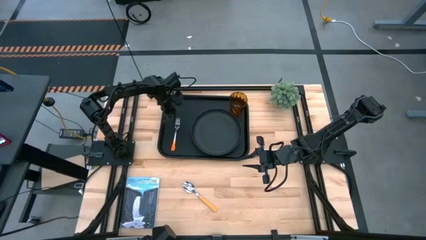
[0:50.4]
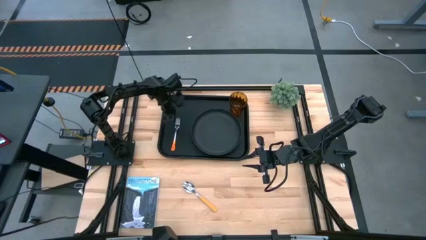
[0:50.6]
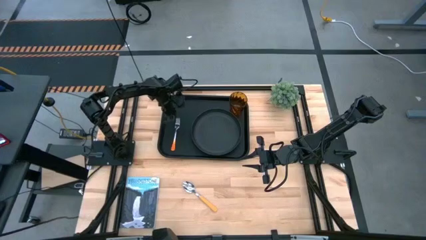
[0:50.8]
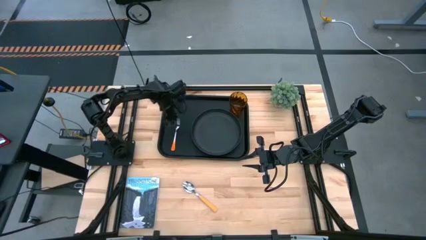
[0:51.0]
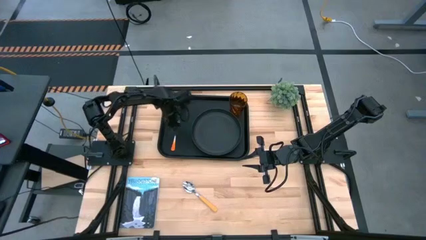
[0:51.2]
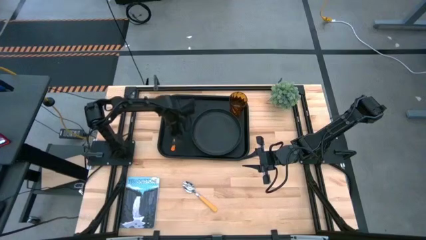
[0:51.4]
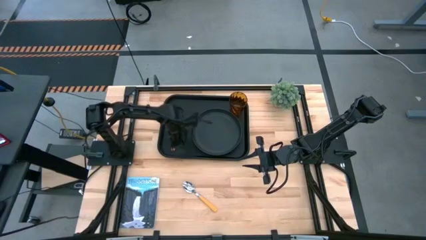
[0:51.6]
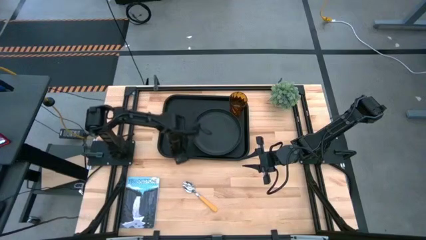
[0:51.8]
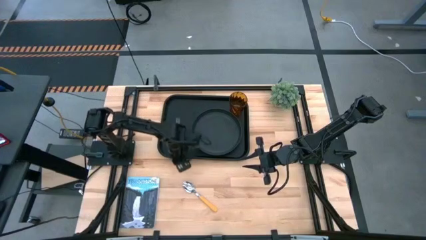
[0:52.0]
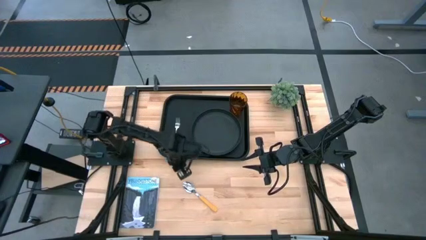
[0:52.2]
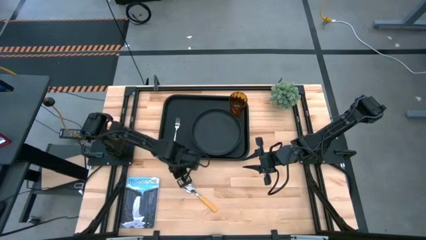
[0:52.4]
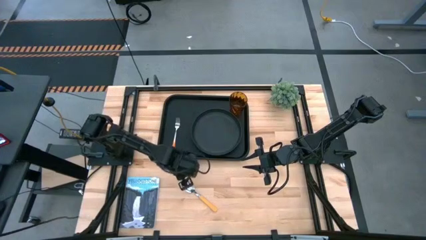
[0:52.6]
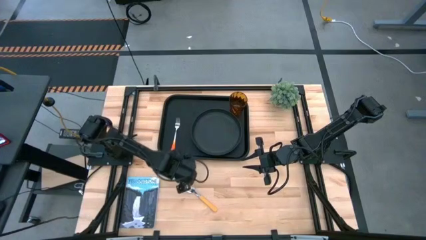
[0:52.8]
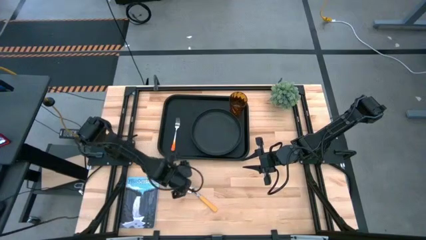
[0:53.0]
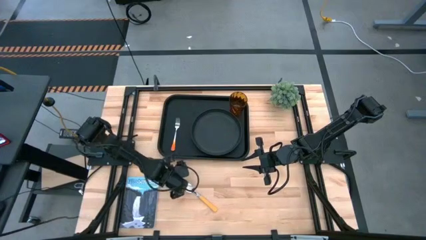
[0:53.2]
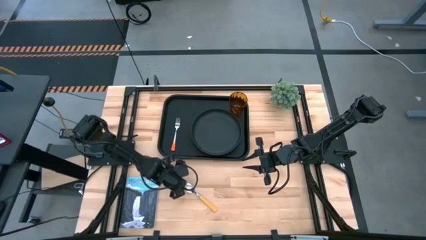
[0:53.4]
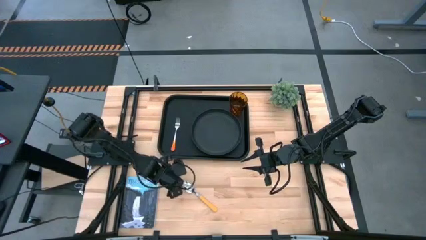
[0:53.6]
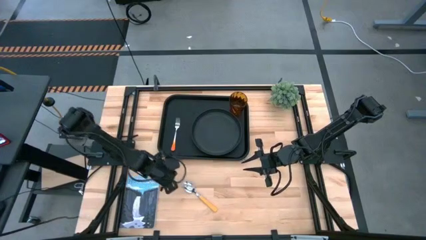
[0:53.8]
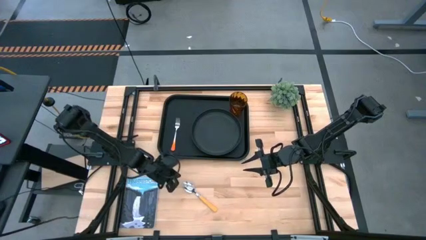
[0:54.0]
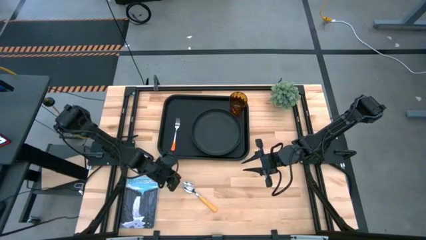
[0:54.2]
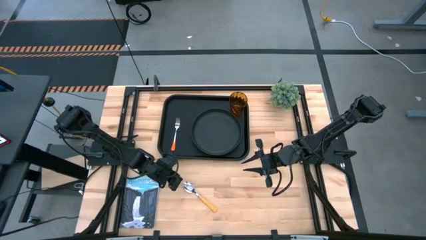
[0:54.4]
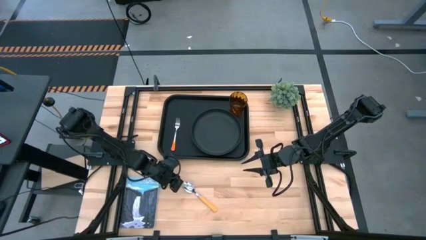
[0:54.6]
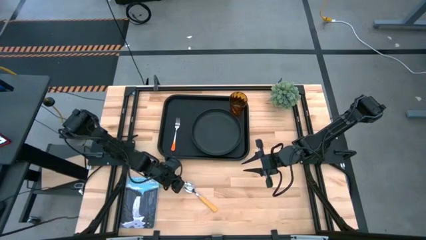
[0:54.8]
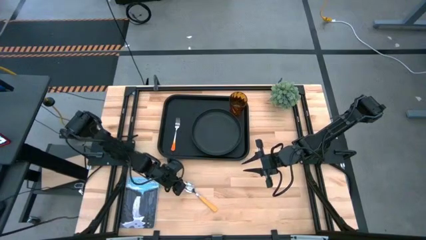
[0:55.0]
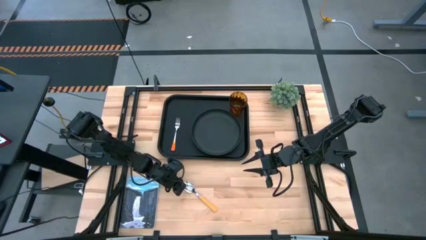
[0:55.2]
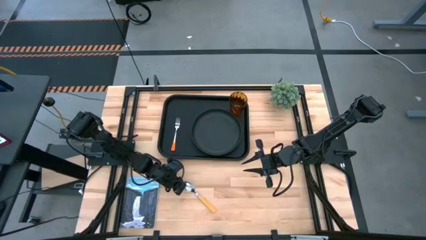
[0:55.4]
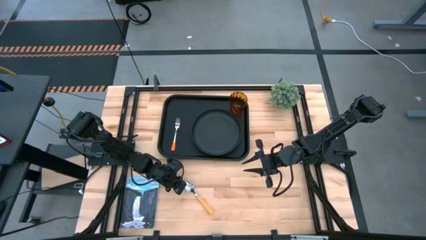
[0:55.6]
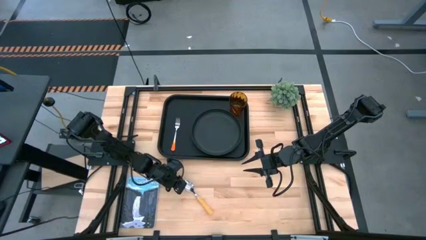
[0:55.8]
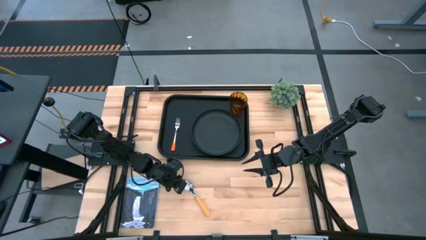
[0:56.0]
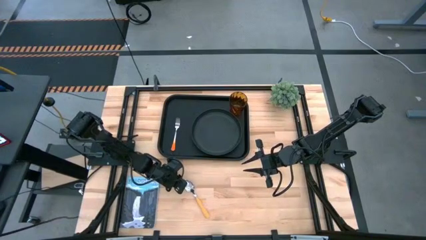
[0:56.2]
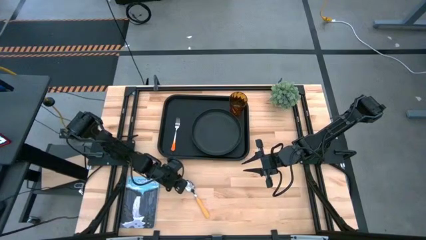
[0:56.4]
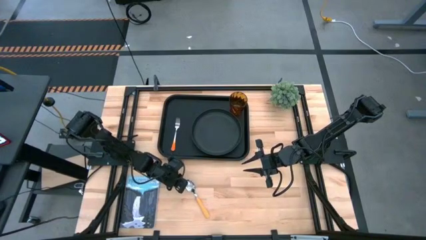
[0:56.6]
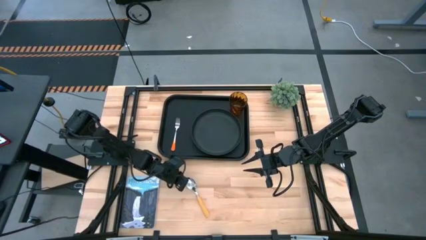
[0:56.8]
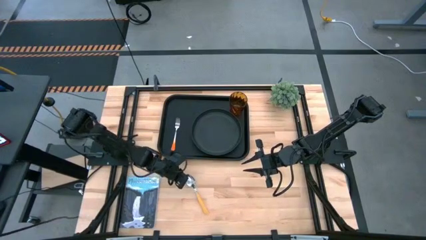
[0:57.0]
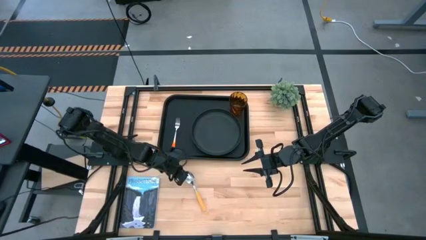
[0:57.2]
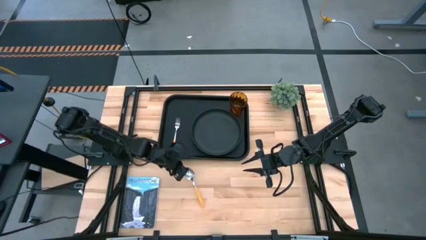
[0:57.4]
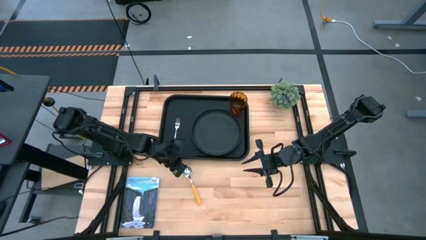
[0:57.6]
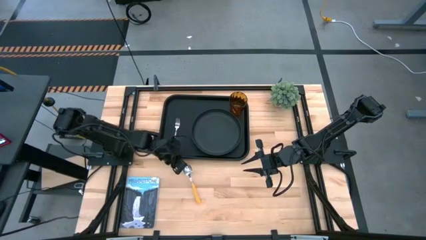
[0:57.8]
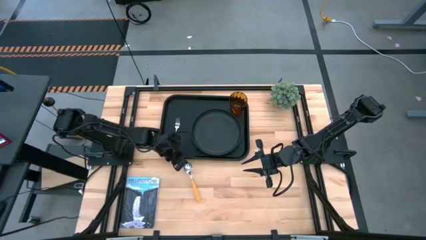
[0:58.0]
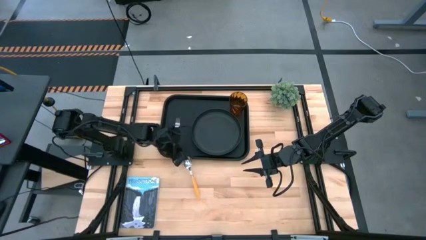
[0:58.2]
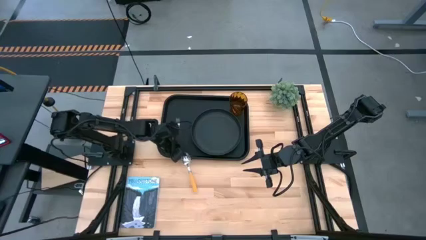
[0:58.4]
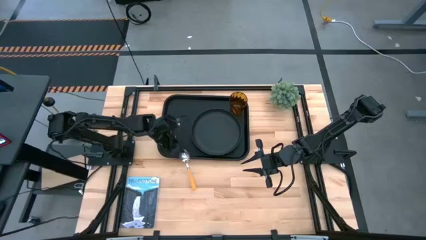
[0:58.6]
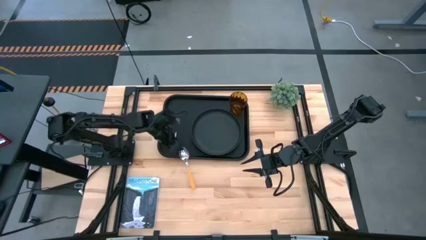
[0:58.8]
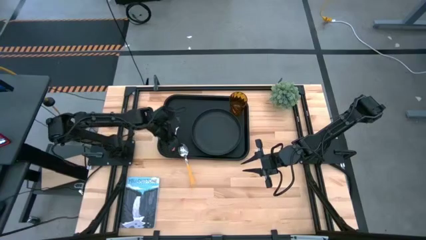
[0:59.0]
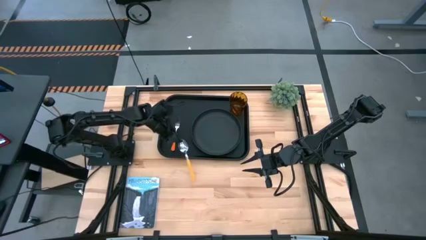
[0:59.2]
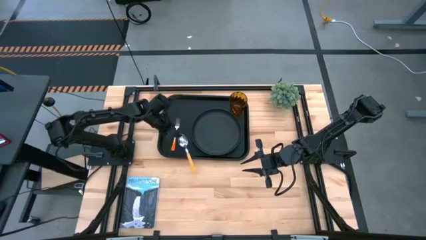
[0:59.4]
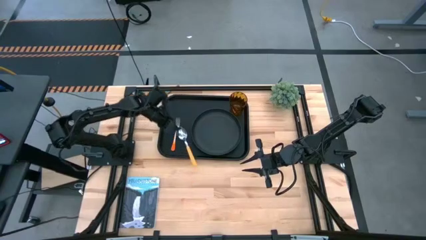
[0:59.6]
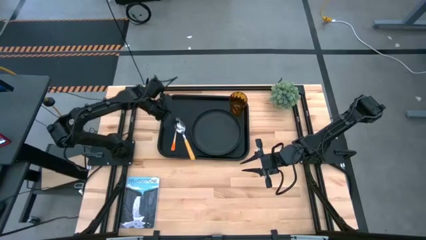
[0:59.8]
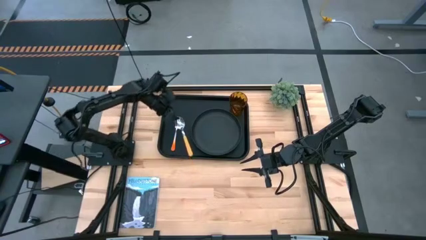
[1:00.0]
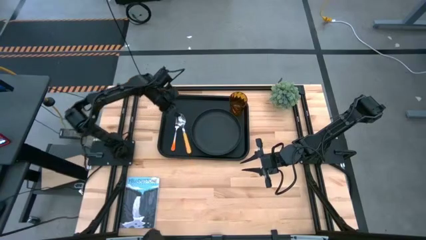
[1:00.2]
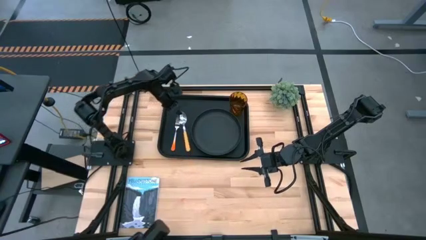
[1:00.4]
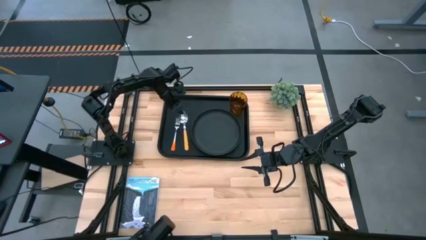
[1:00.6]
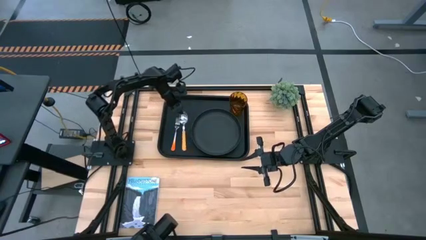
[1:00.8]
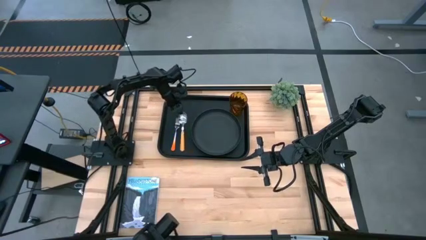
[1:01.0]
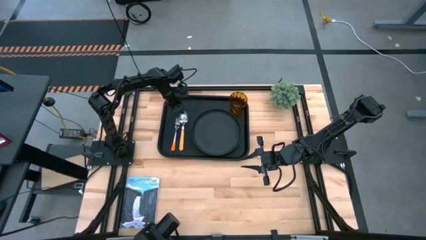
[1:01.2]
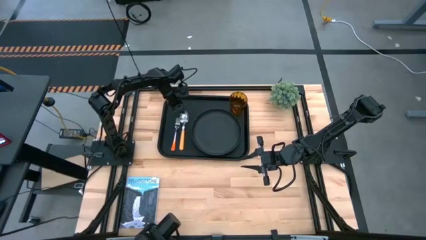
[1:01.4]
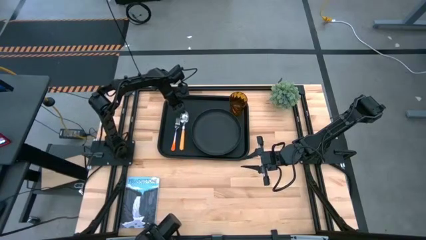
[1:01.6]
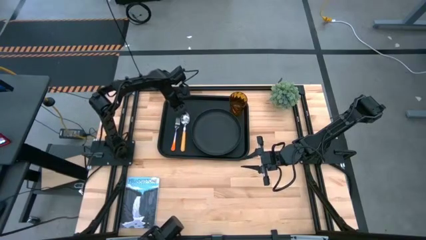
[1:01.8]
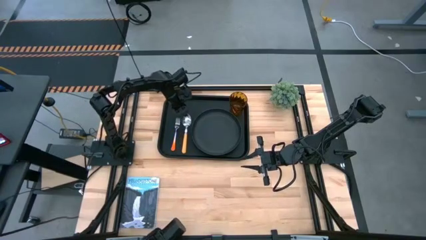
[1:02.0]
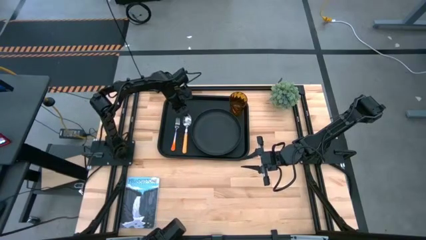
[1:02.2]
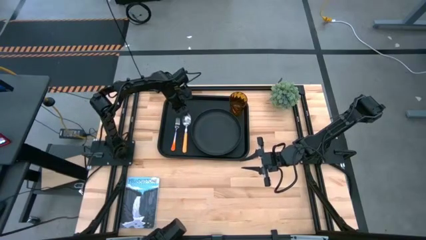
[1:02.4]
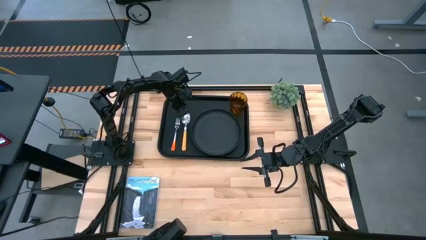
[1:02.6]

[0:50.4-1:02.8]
Task: Pick and place plate/cup/fork/spoon on tray
Put the yellow spoon on the black serving tray beside the orange fork

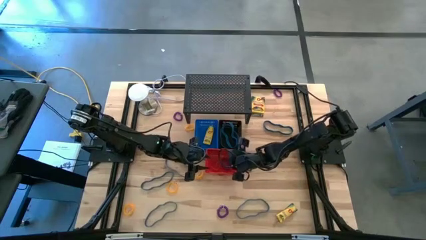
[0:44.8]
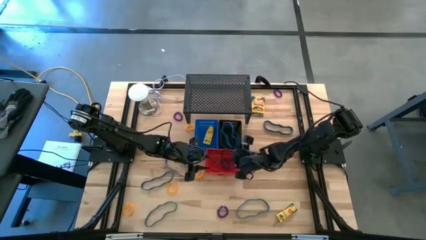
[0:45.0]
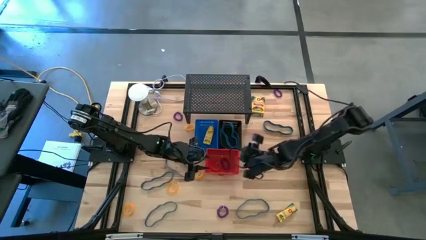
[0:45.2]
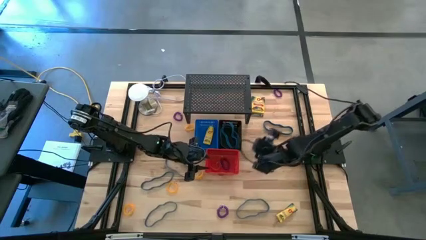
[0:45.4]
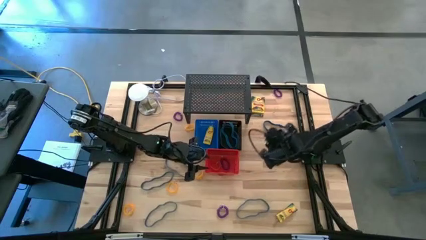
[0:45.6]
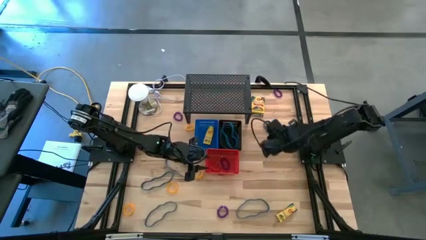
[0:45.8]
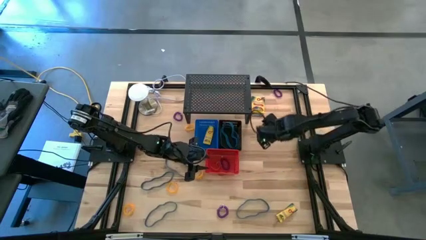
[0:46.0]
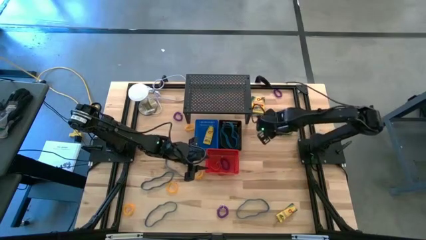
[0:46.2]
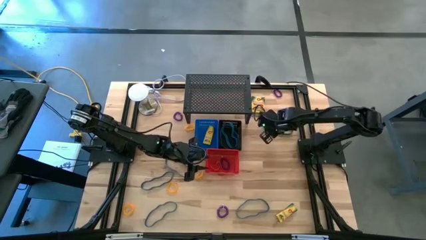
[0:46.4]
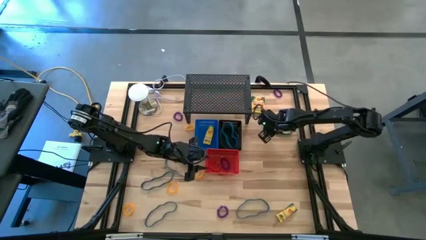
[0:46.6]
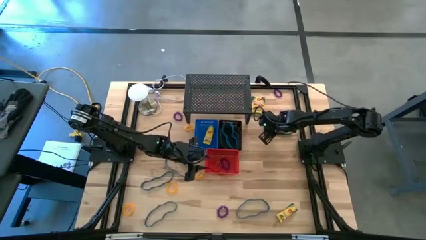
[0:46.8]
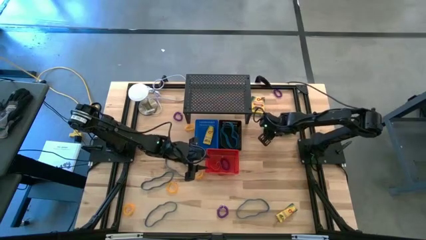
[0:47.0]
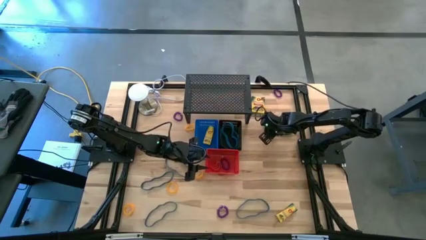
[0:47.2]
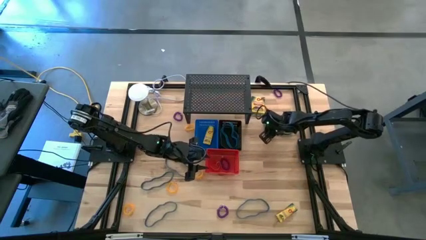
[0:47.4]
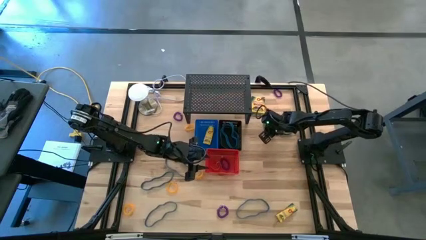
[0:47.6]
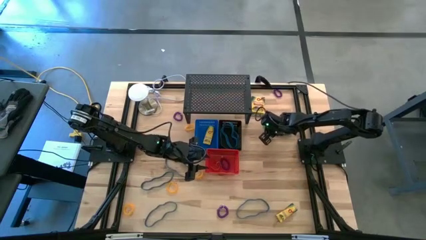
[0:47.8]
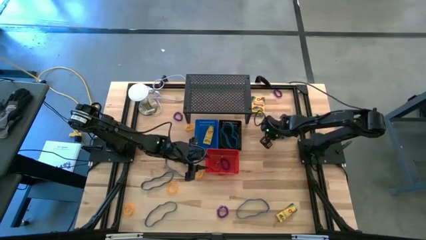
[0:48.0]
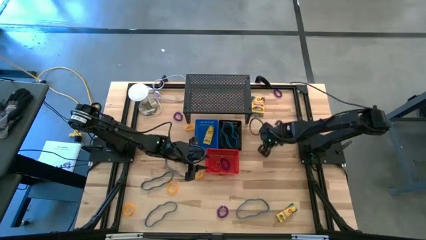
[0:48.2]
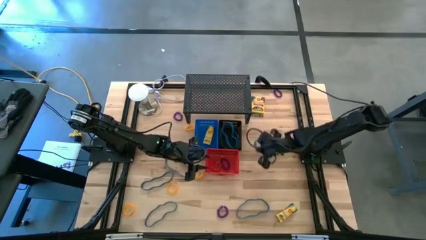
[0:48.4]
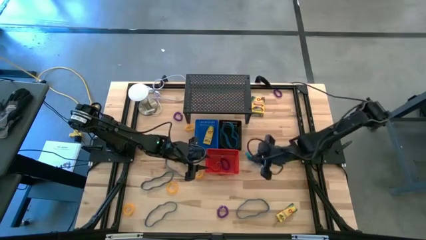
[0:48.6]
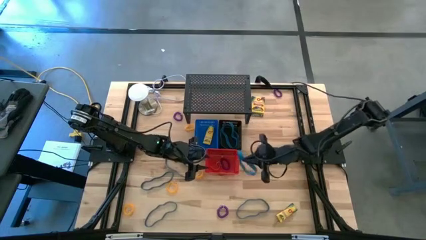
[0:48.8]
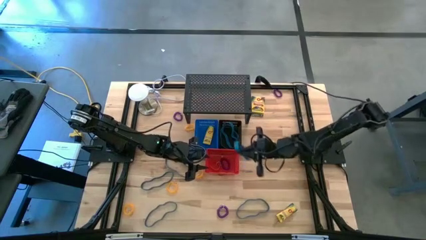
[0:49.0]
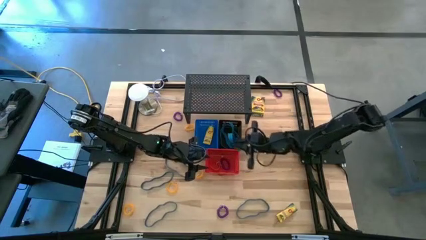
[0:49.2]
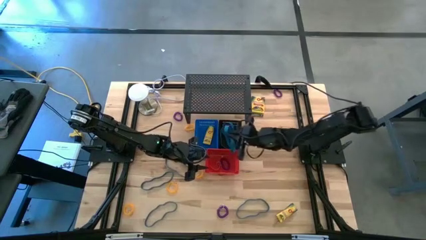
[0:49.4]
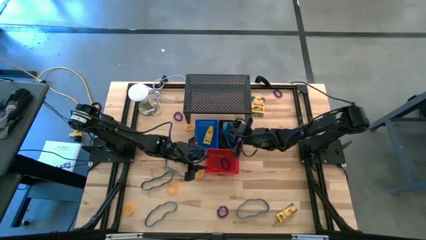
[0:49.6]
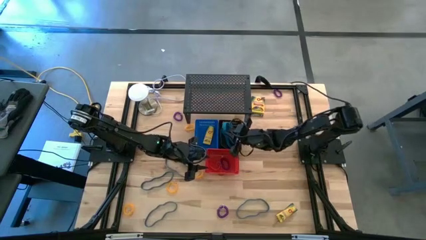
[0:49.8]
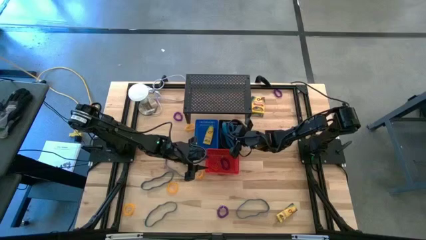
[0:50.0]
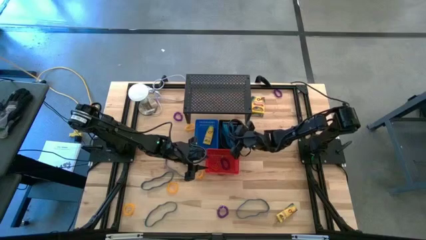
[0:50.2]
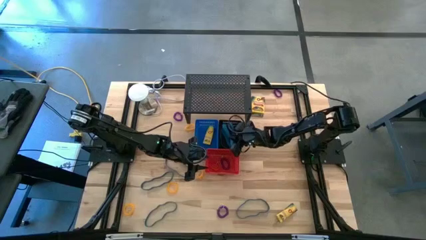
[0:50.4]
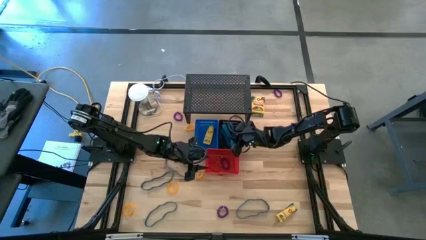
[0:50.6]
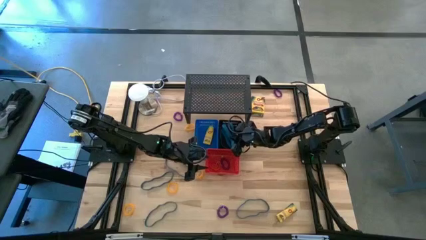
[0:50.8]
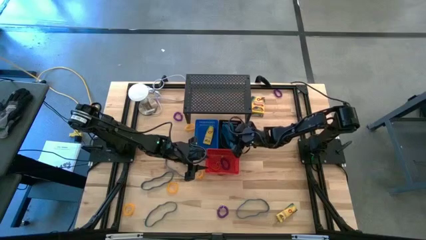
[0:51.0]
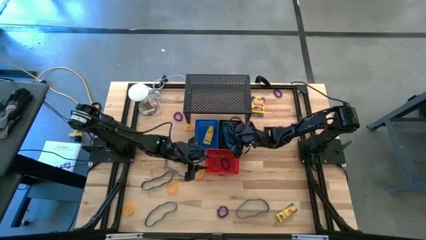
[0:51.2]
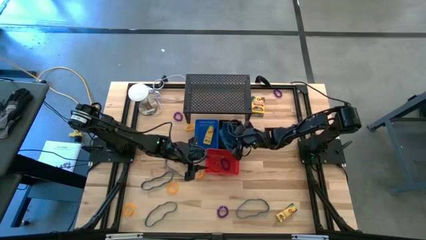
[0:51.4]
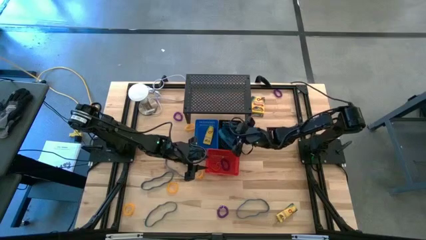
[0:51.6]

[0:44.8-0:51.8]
Task: Pick & Place Office Desk Supplies
Put the blue rubber band into the black bin
